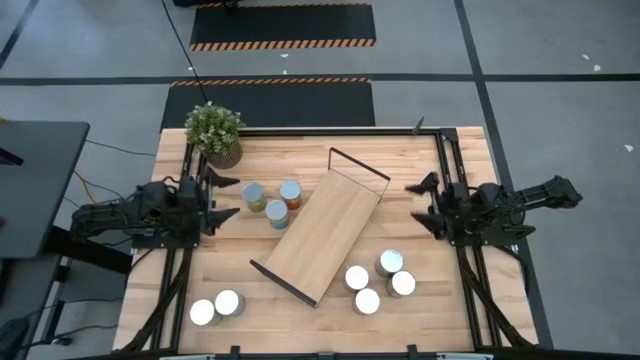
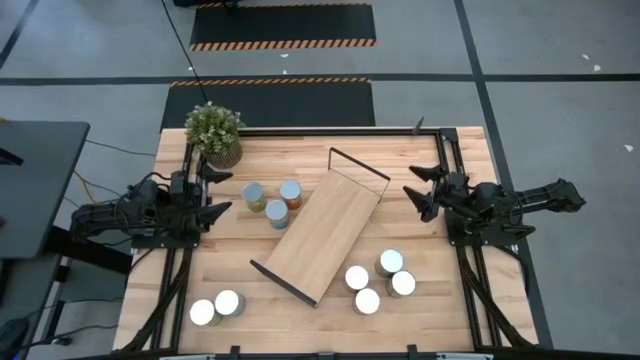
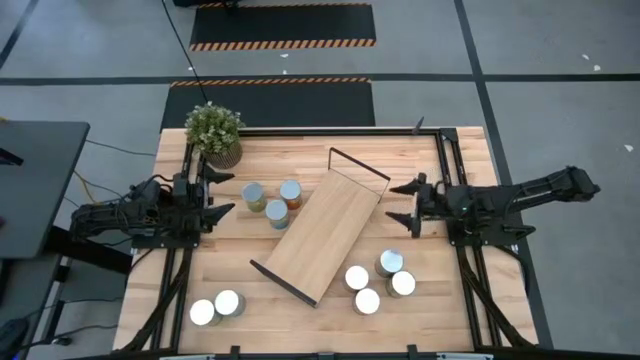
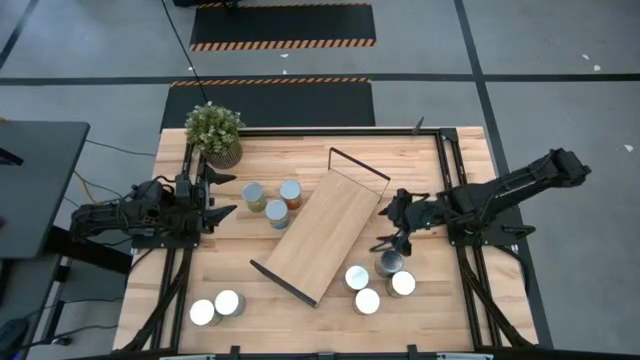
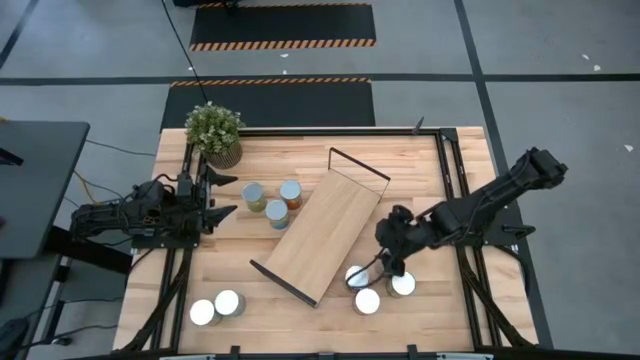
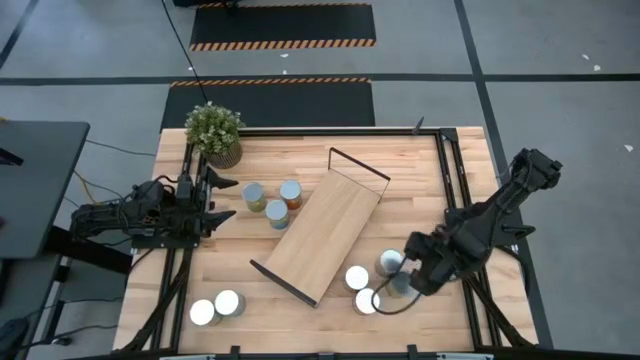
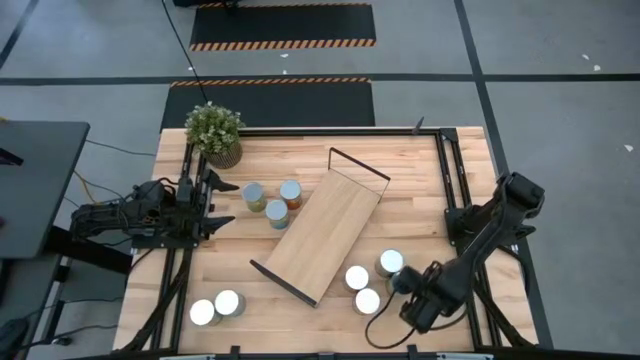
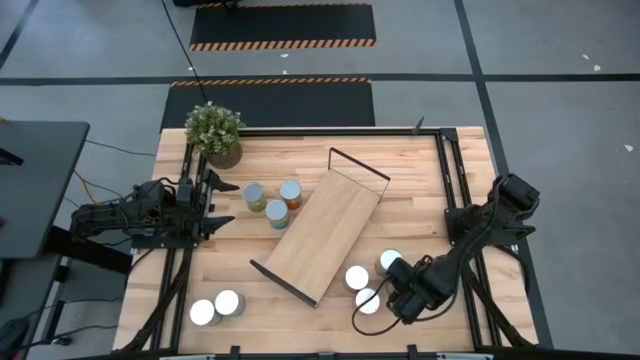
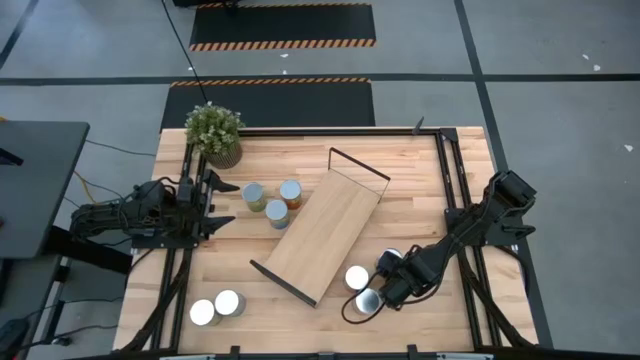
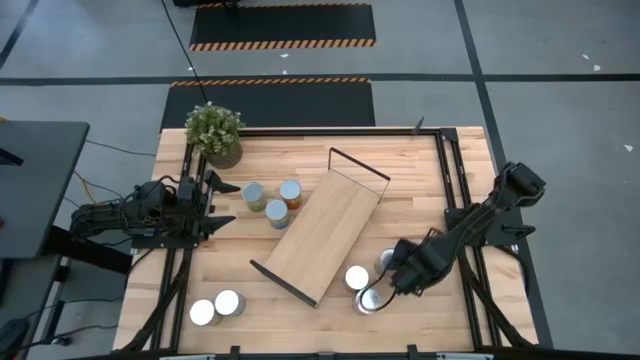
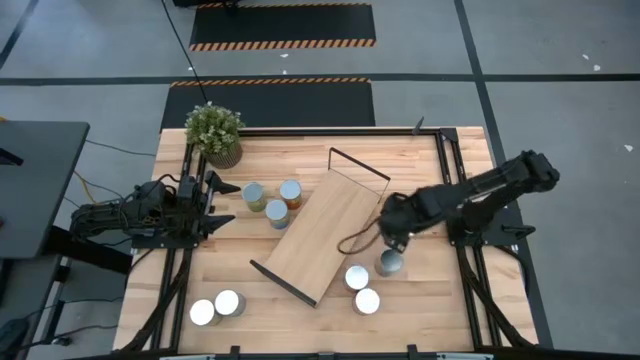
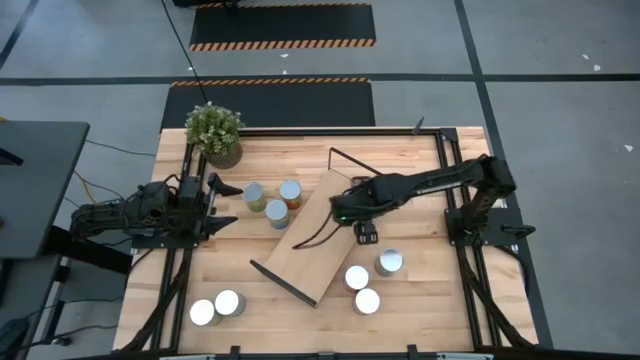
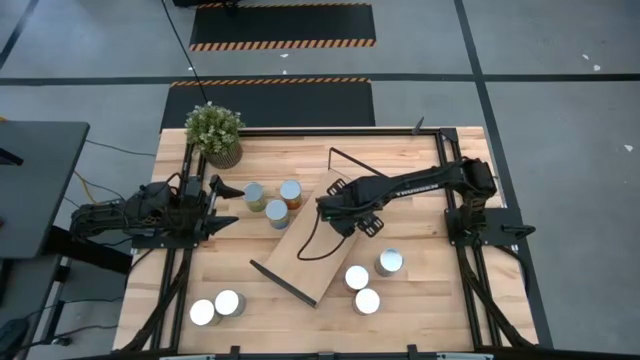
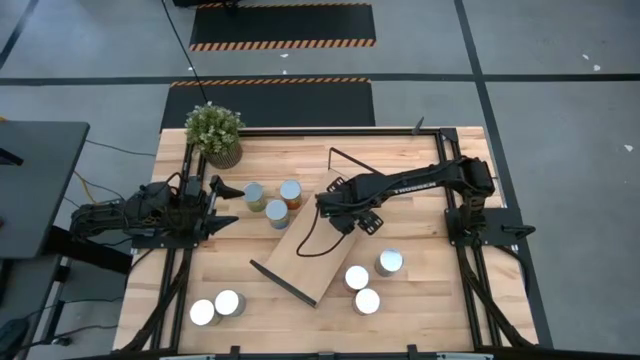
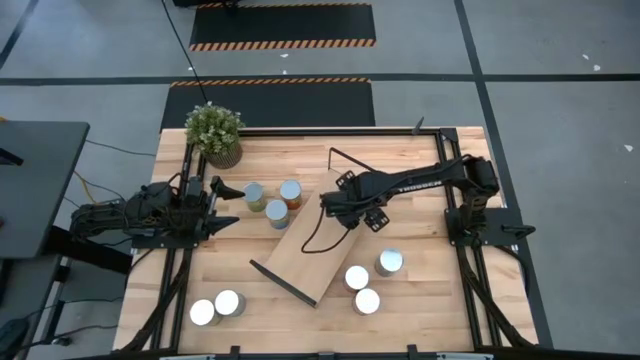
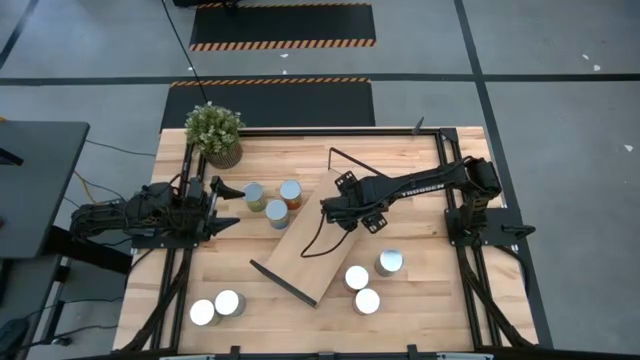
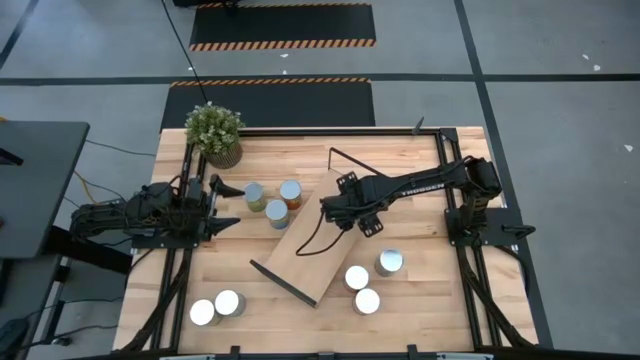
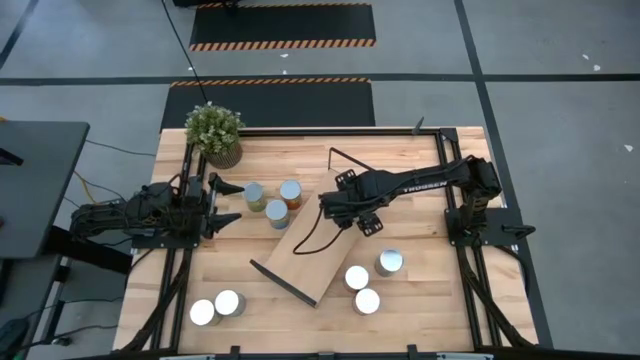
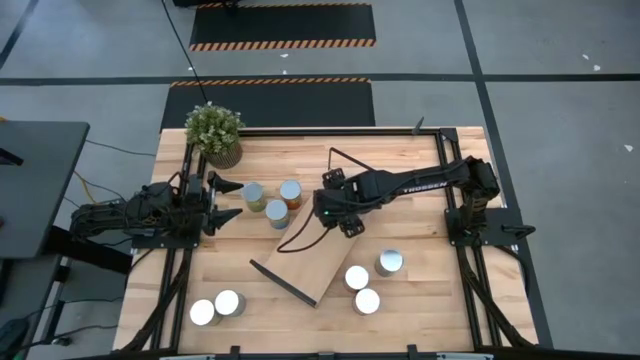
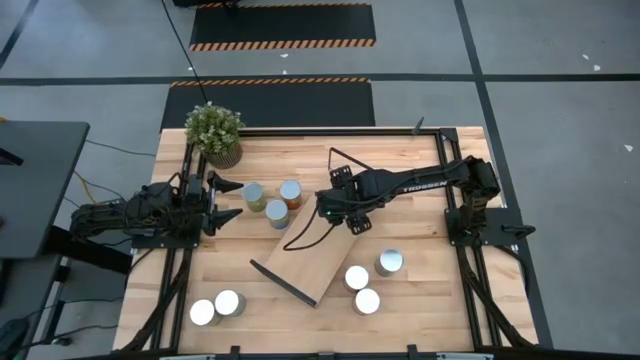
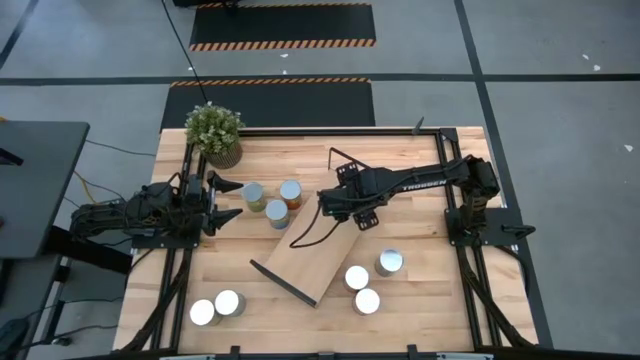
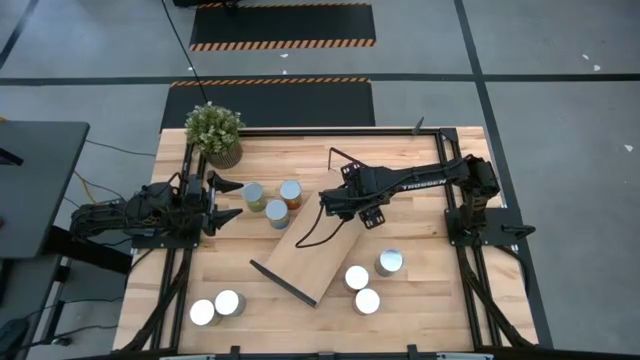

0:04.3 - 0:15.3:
Task: Pick and place cans onto a shelf
Put the canned peas on the shelf

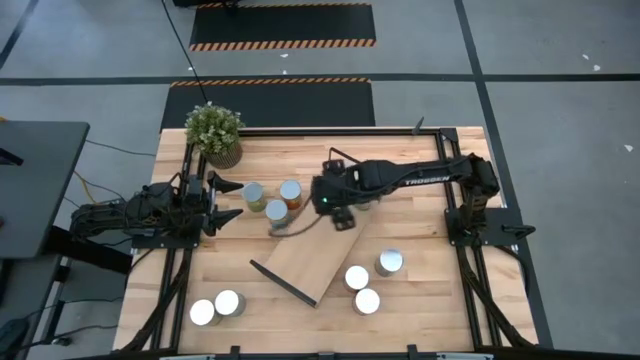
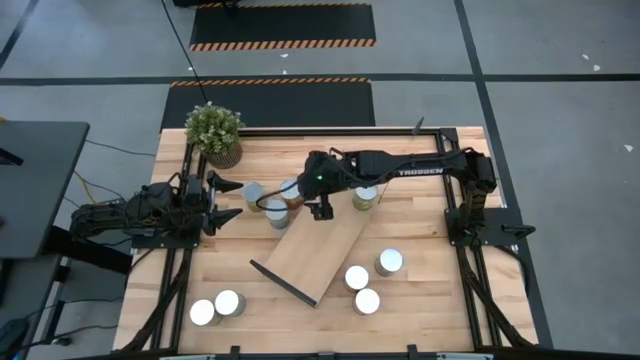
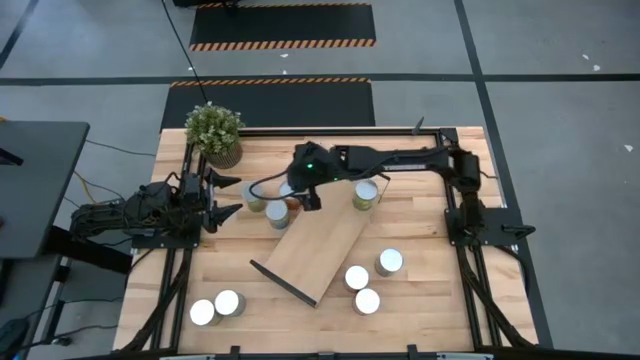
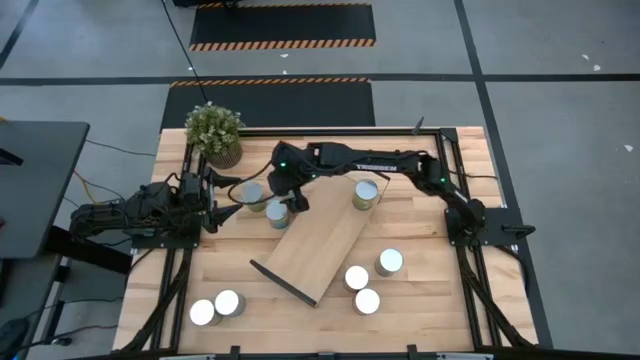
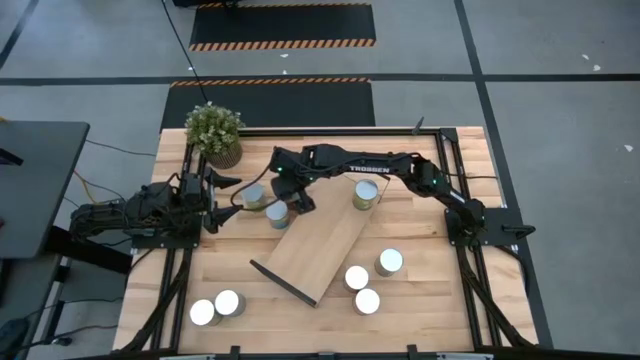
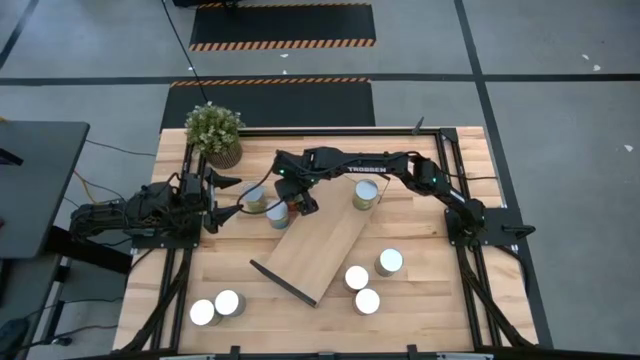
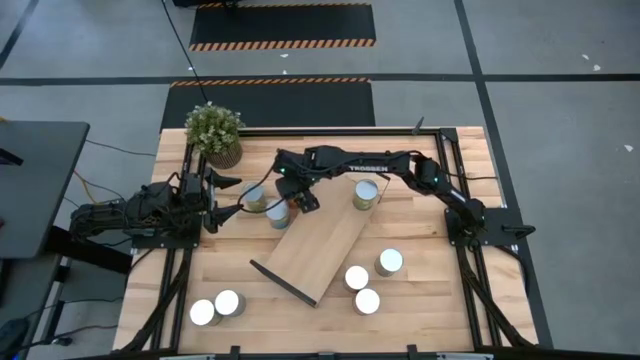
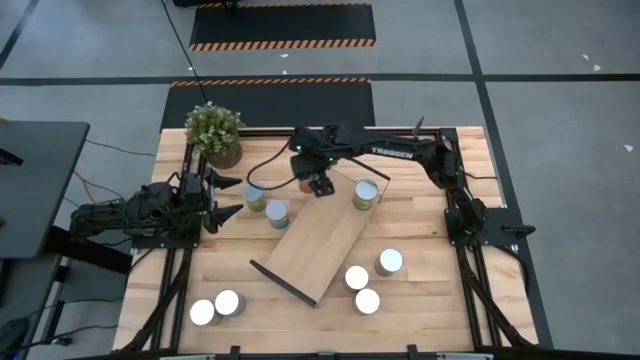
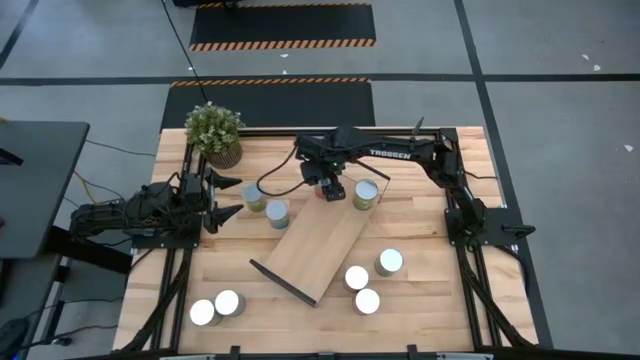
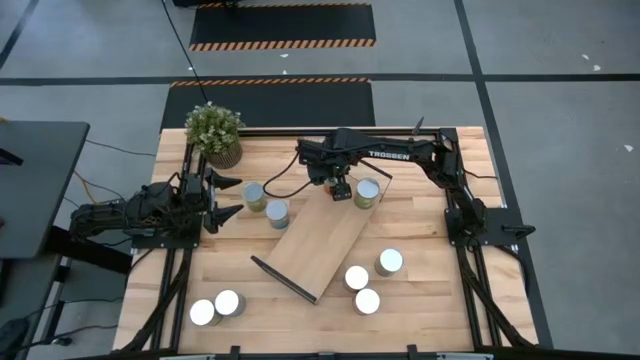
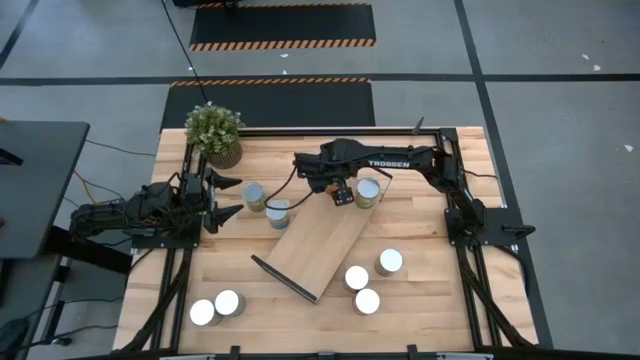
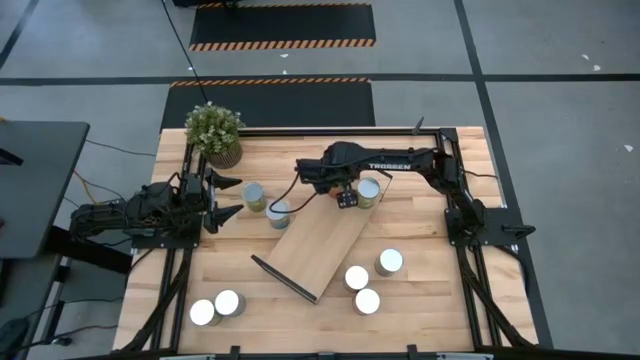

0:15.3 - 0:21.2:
Put the top canned pineapple on the shelf

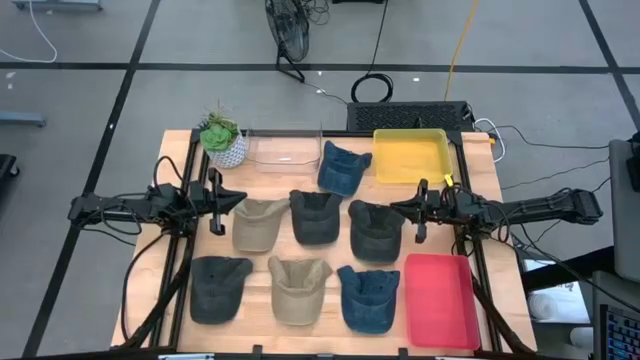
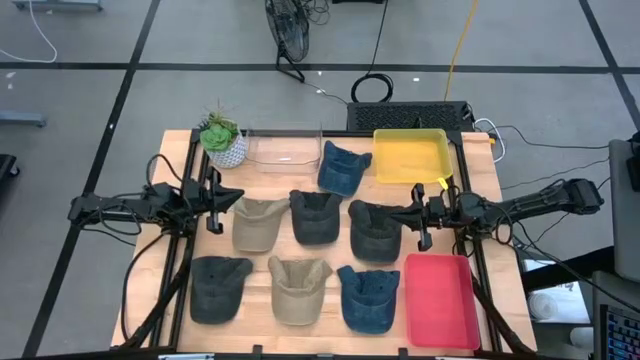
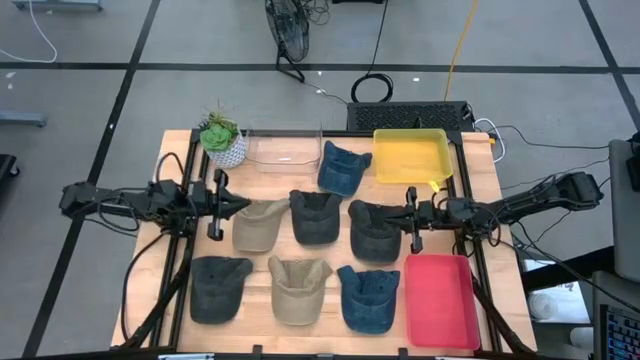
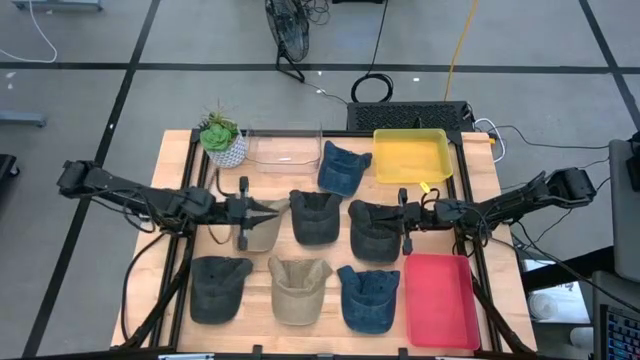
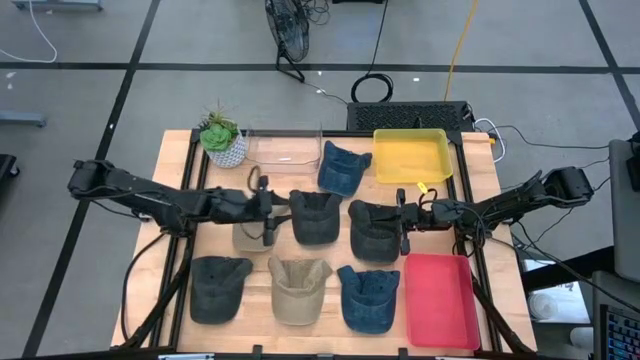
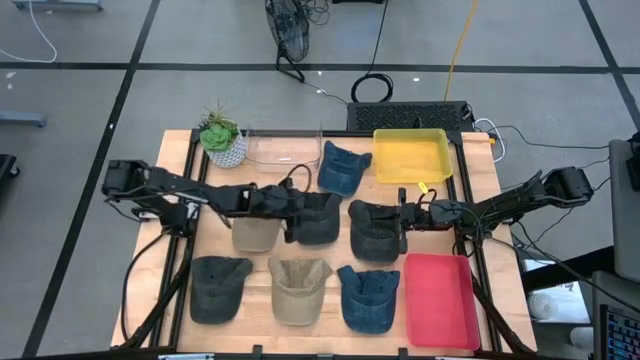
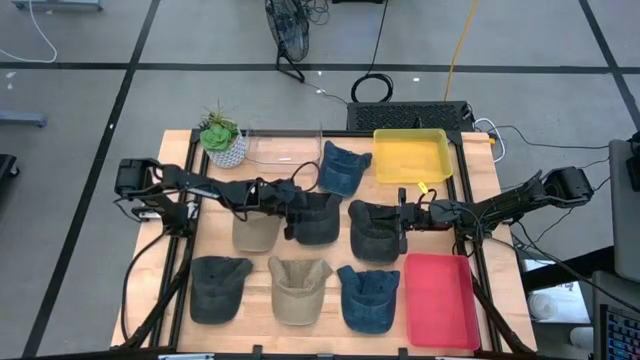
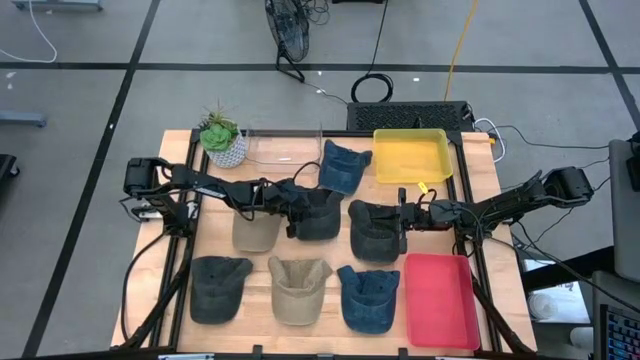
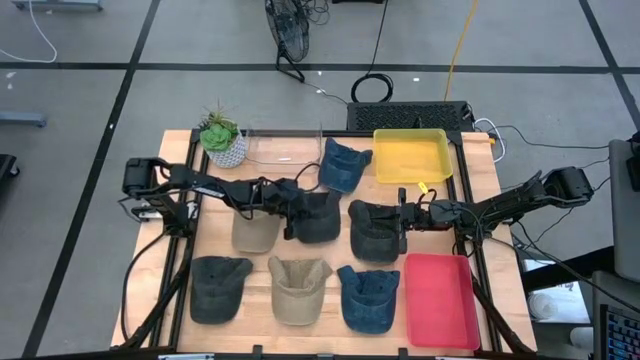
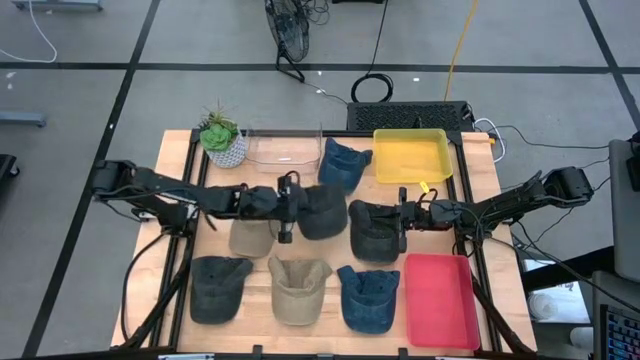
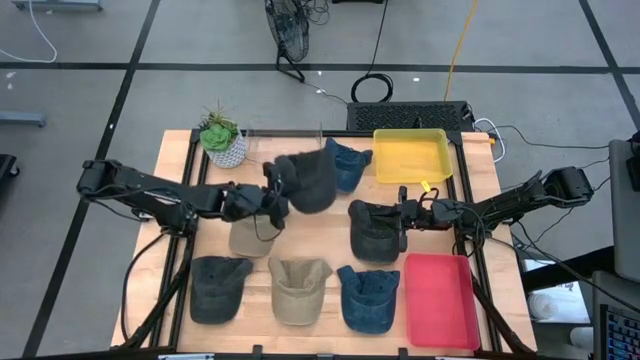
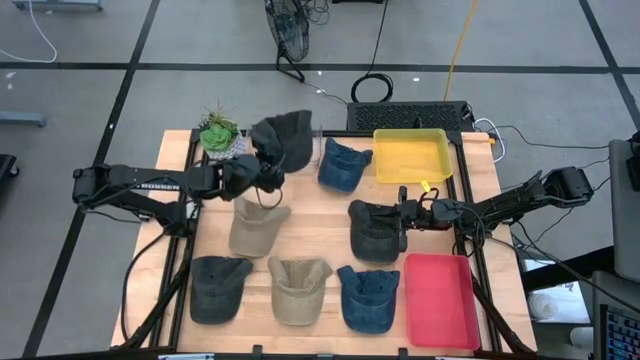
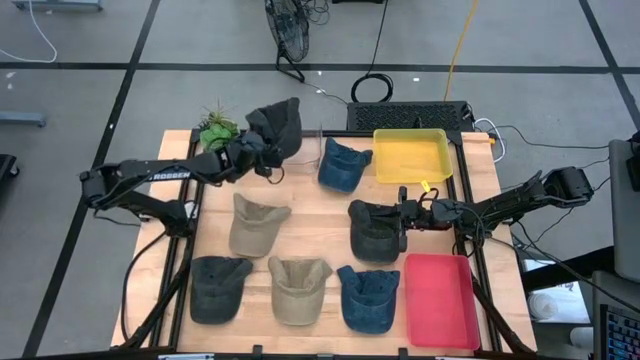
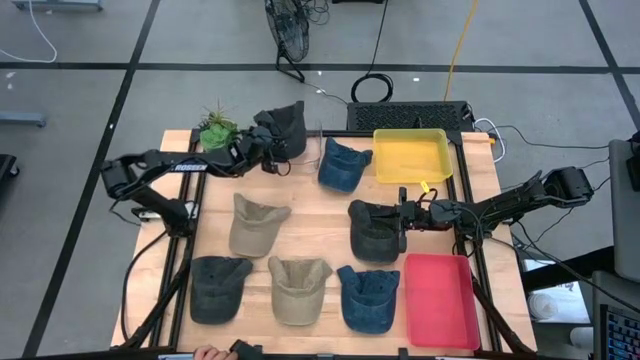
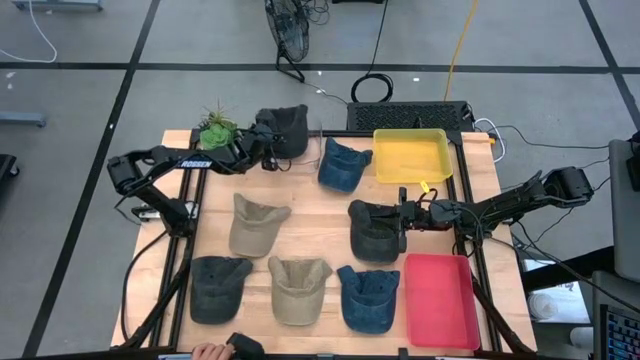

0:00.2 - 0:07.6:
Task: Pick & Place hat
Put the middle black cap into the transparent bin
